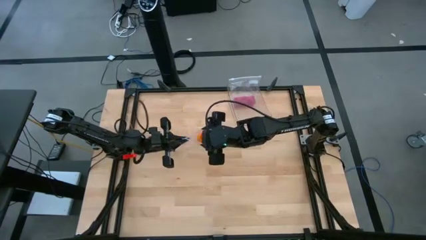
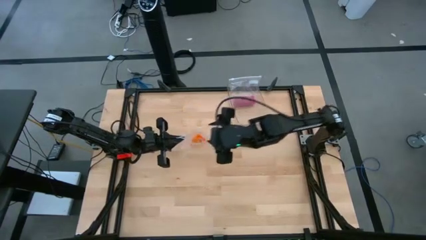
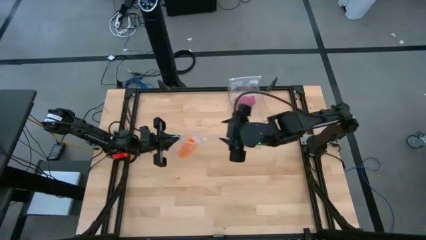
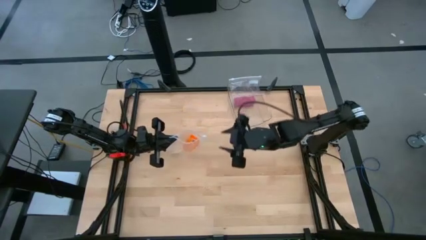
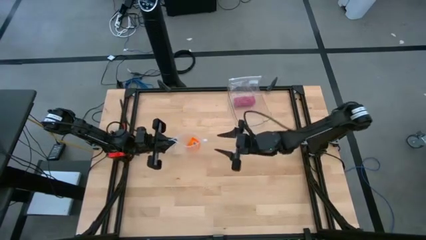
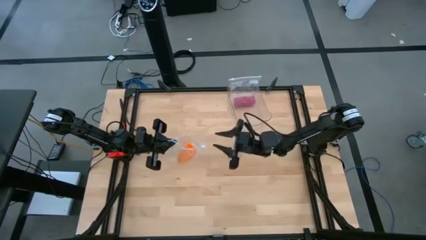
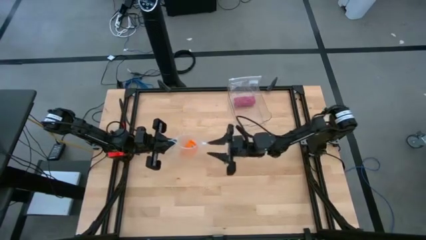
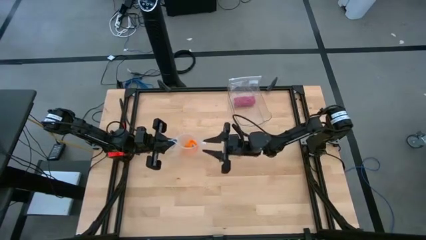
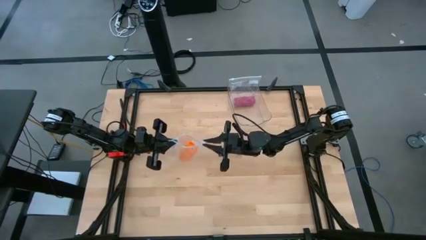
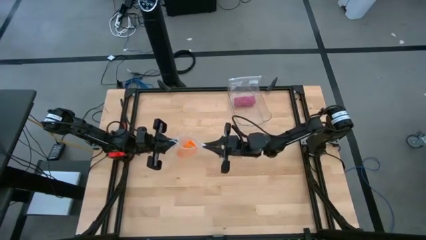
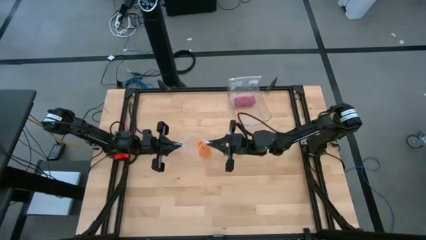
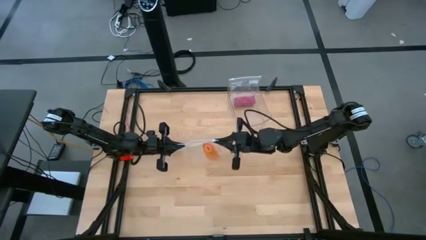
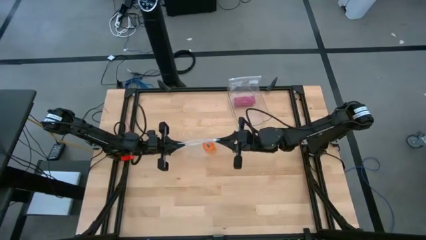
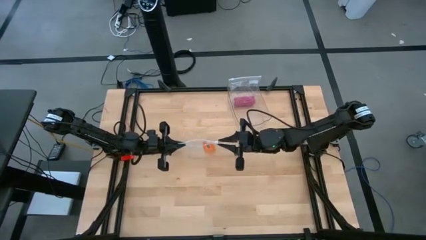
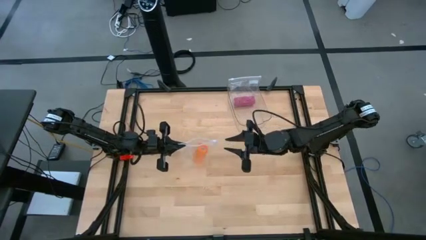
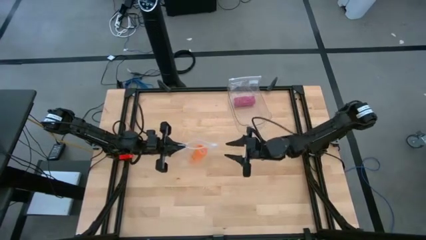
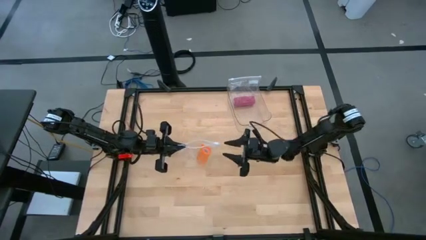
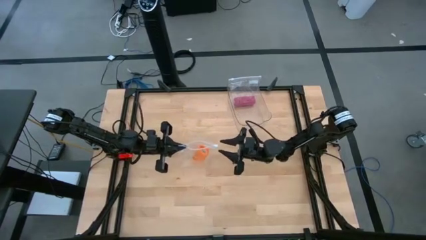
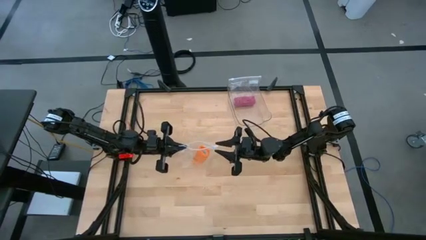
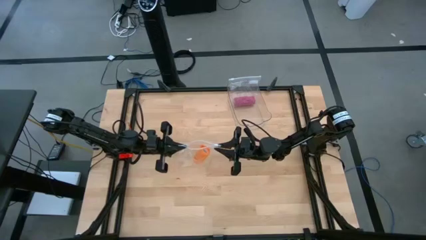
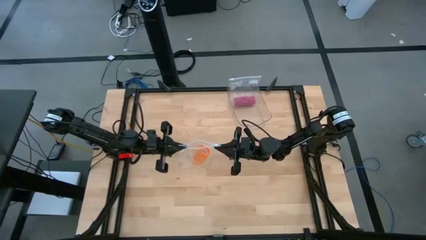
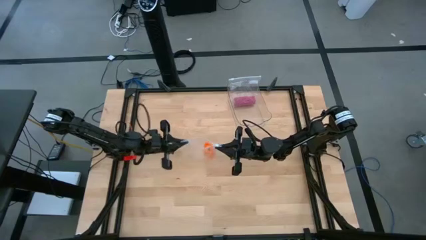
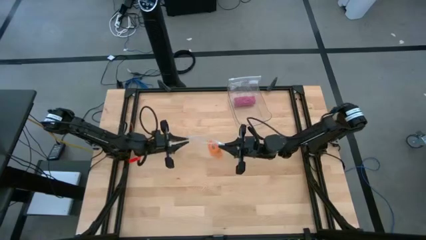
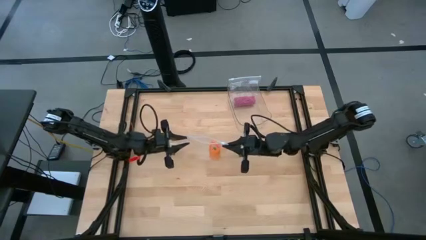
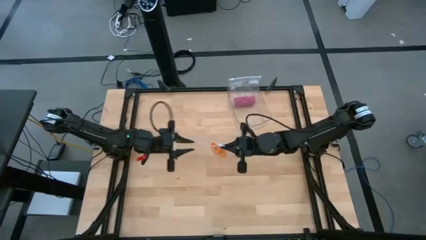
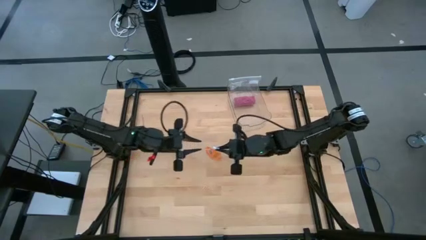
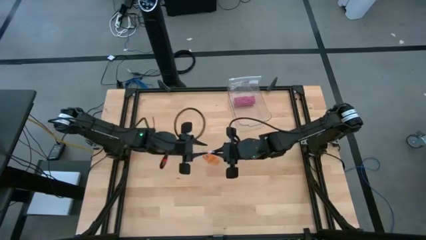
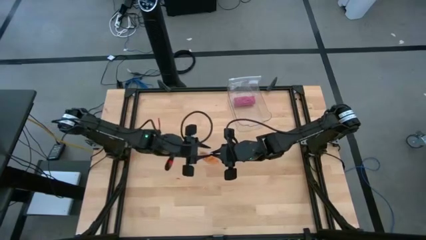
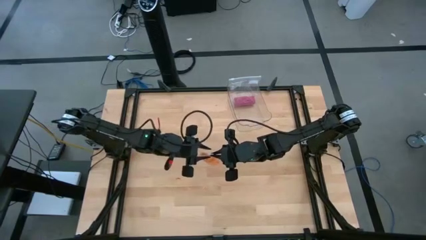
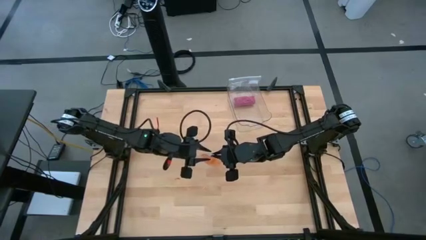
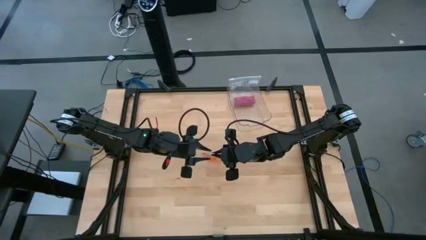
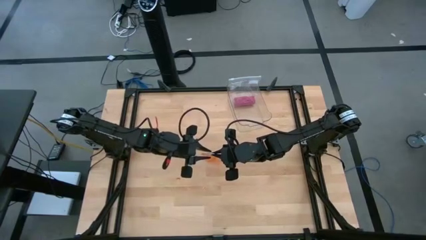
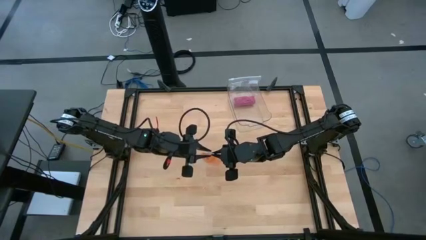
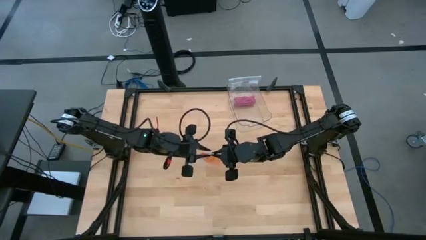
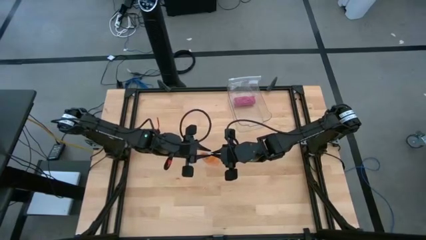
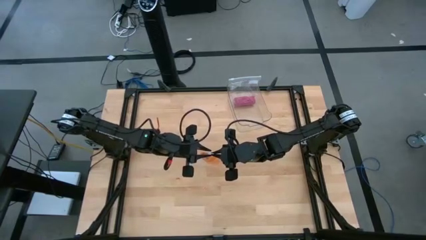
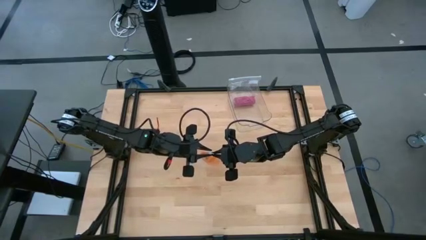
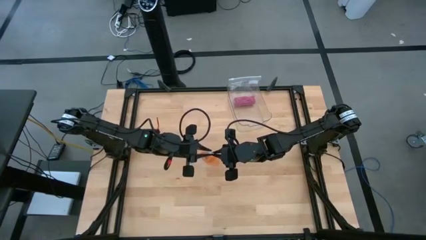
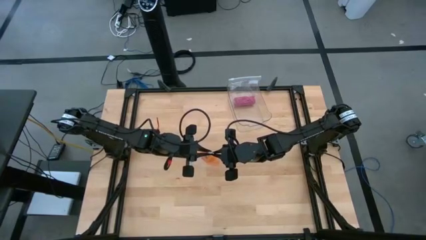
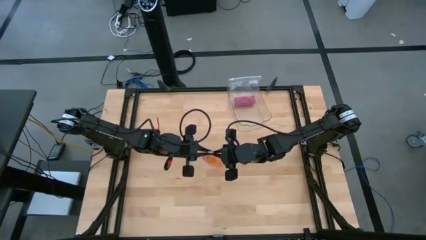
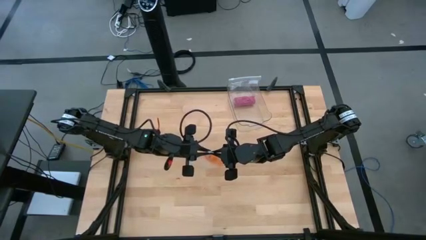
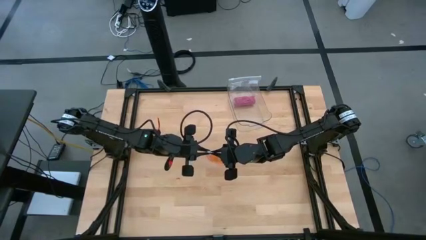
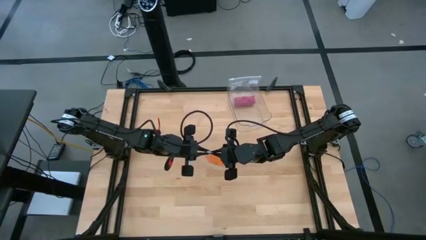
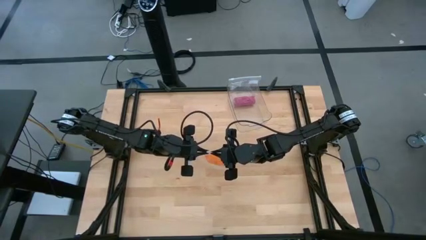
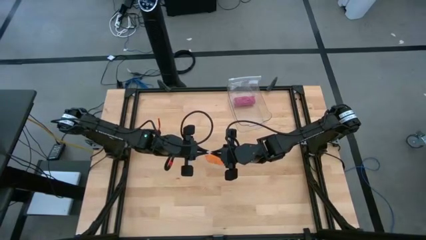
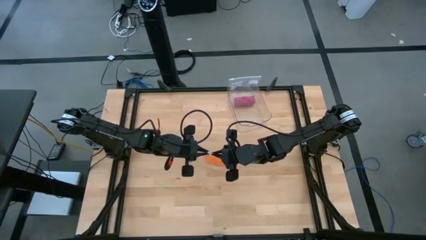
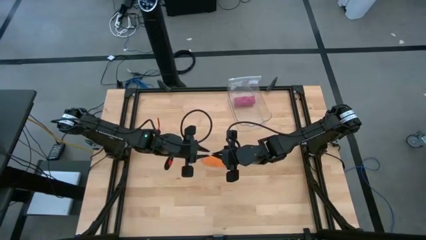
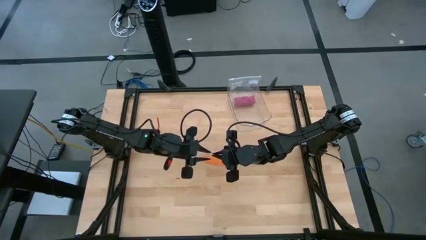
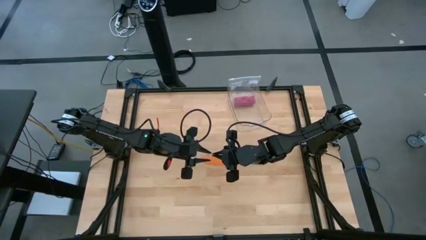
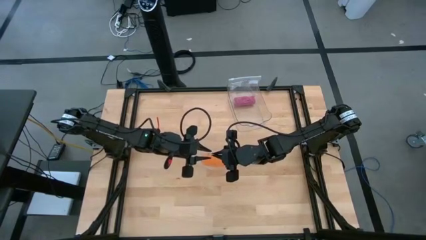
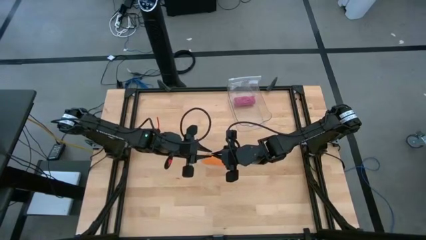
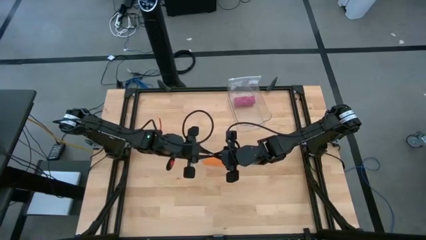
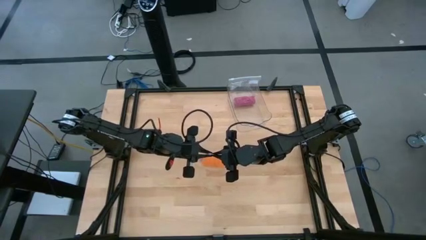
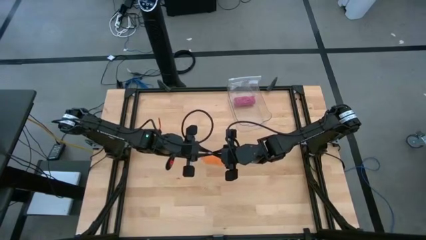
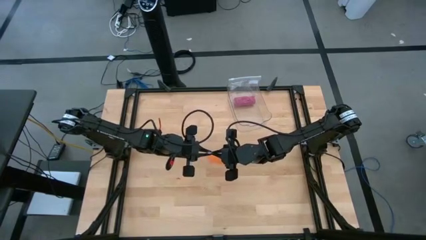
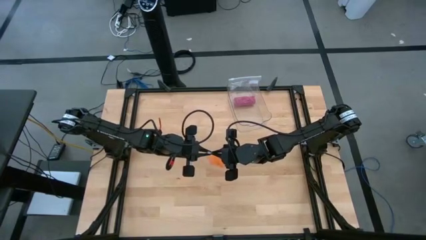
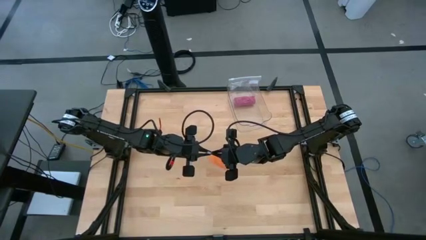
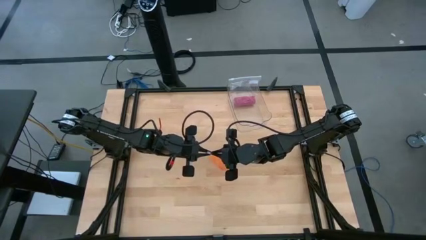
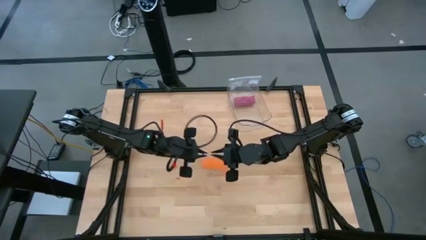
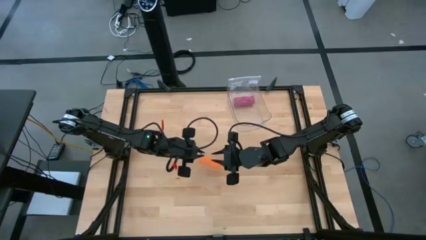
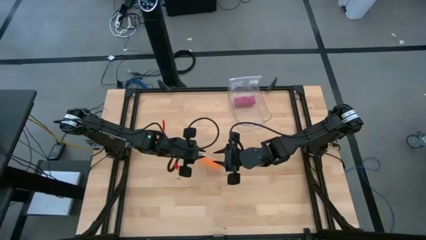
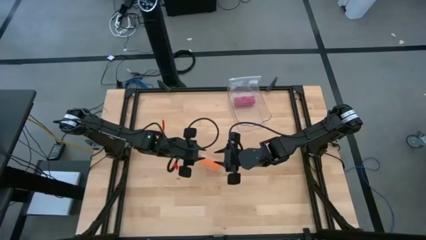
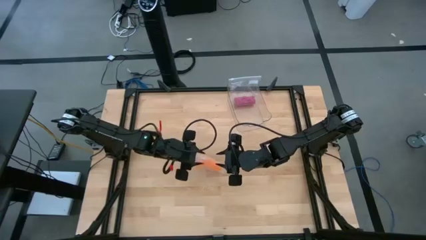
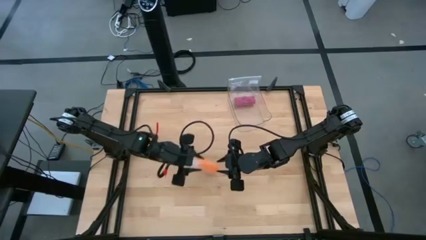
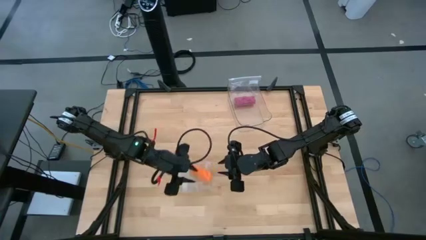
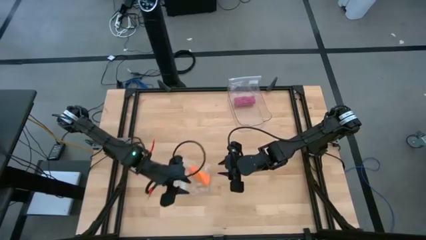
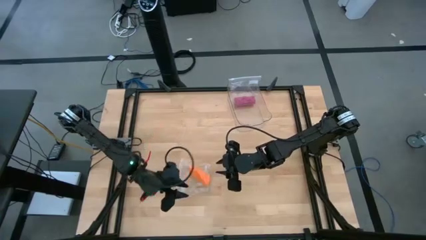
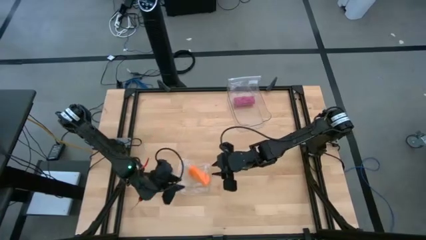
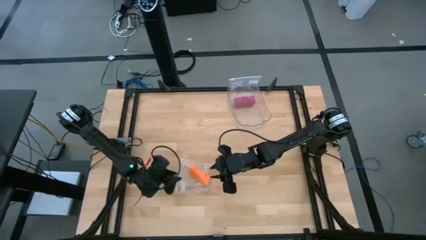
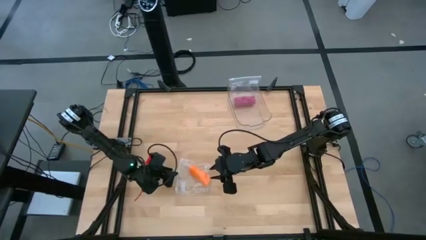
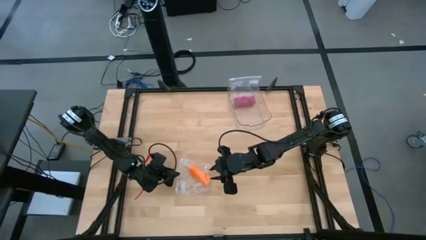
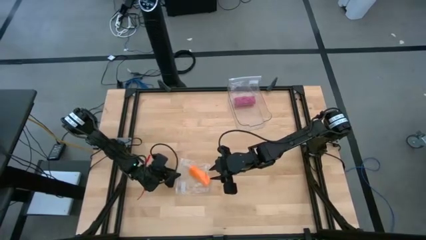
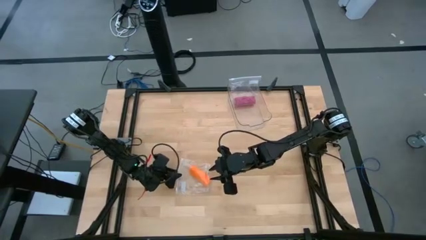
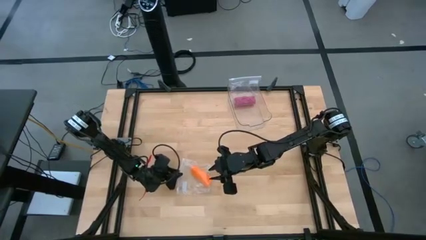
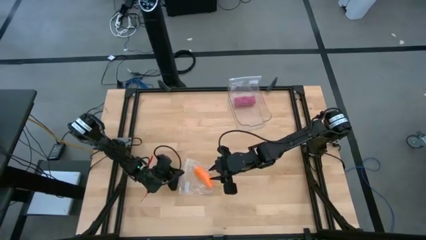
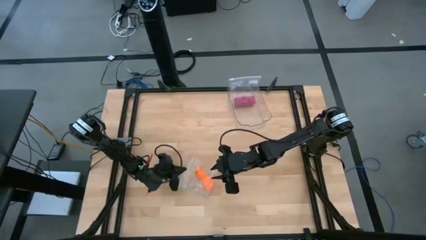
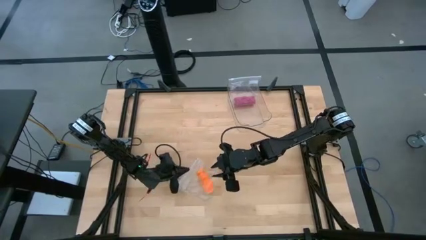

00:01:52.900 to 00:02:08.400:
Task: Roll bandage
Close the transparent zip bag
